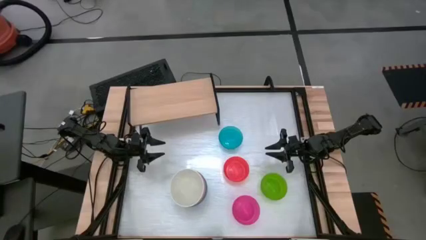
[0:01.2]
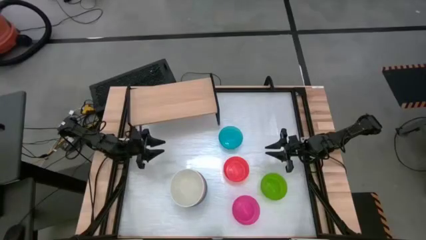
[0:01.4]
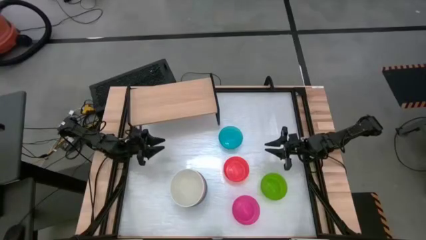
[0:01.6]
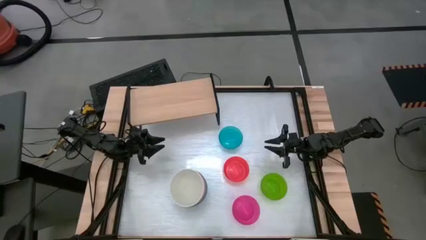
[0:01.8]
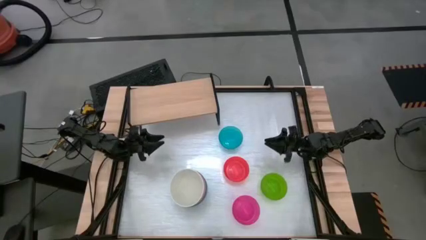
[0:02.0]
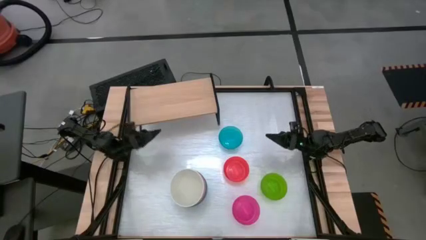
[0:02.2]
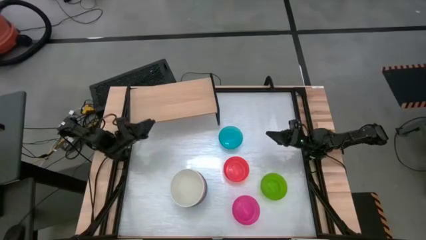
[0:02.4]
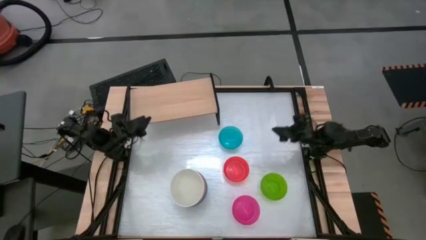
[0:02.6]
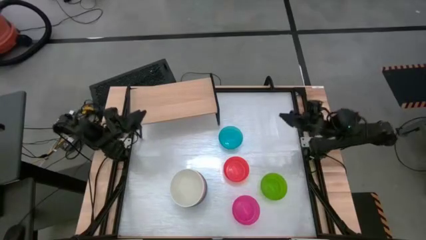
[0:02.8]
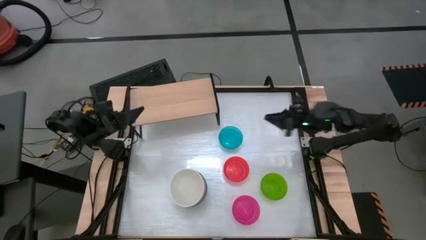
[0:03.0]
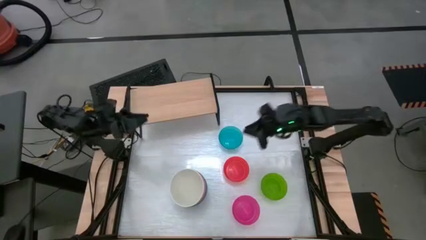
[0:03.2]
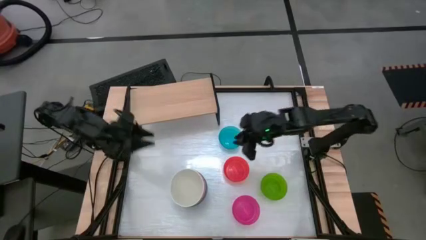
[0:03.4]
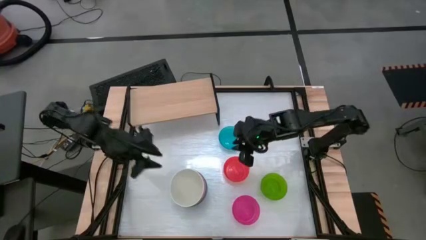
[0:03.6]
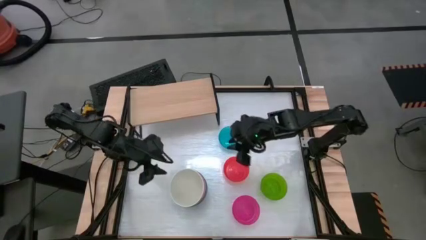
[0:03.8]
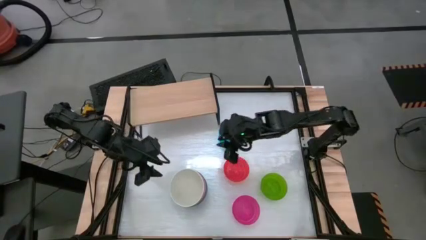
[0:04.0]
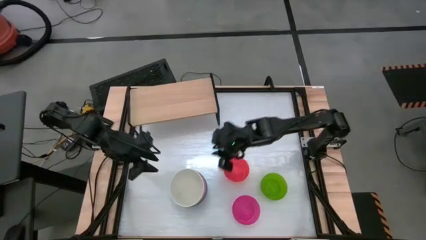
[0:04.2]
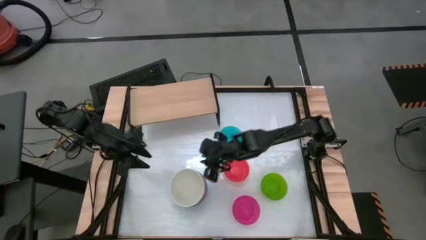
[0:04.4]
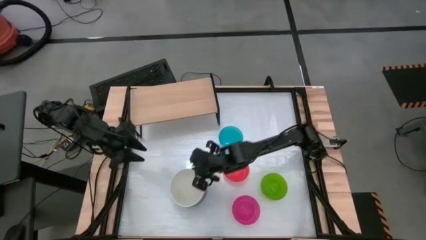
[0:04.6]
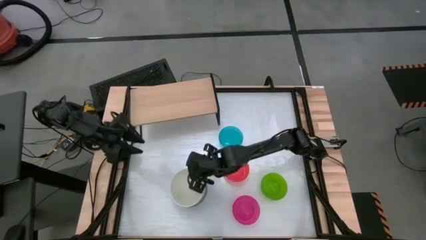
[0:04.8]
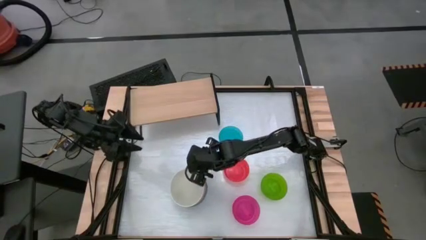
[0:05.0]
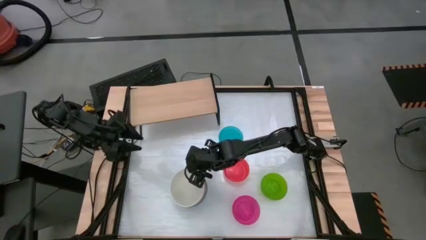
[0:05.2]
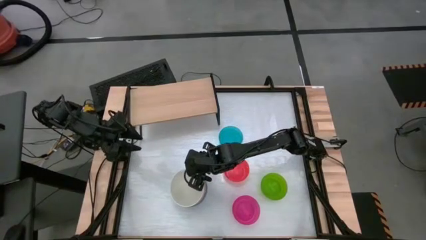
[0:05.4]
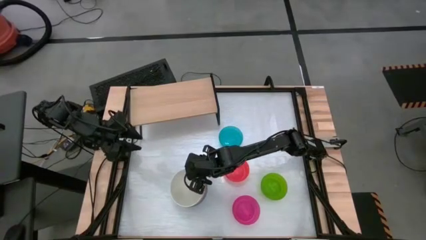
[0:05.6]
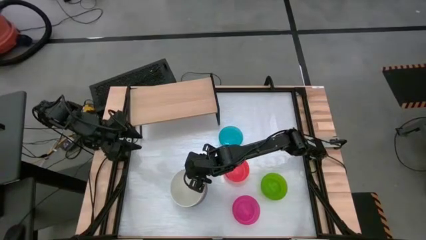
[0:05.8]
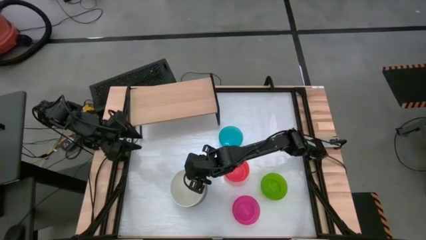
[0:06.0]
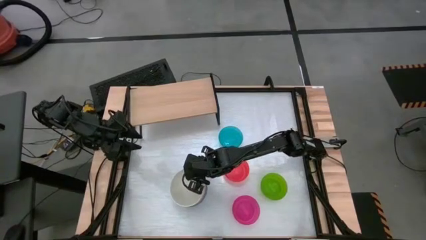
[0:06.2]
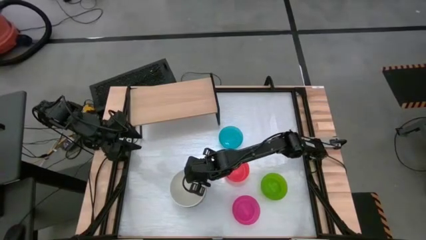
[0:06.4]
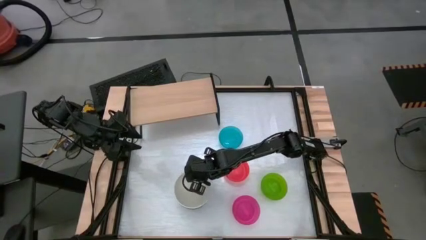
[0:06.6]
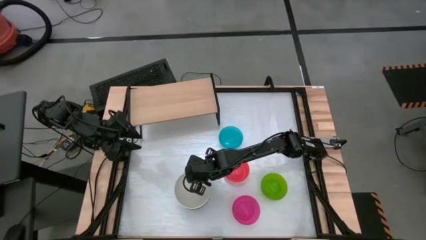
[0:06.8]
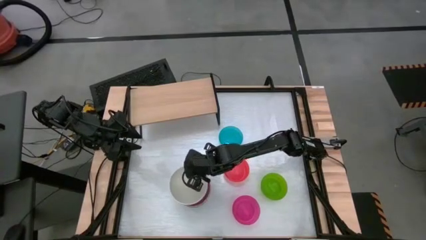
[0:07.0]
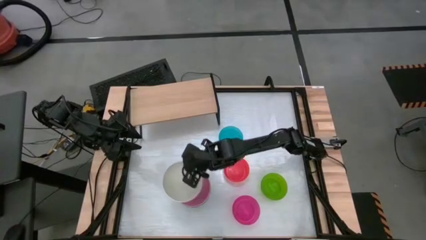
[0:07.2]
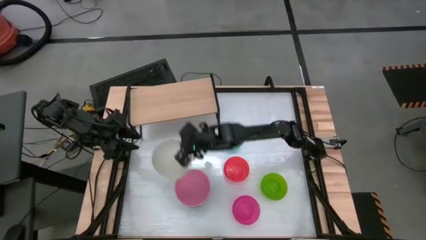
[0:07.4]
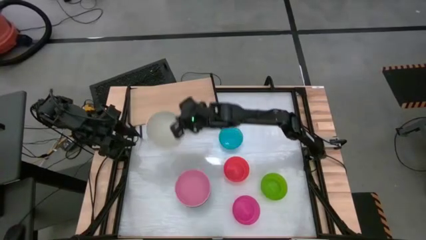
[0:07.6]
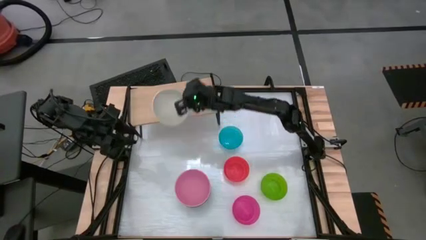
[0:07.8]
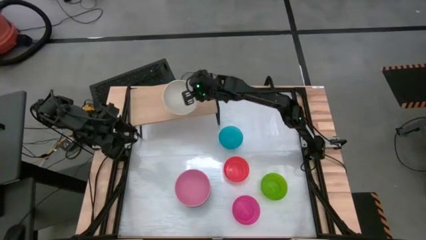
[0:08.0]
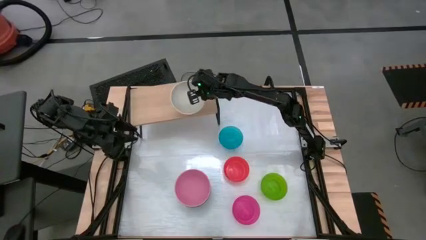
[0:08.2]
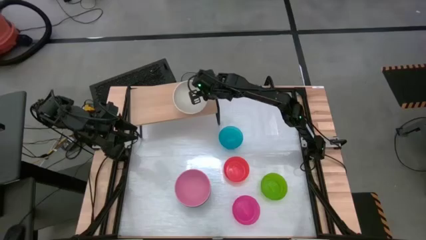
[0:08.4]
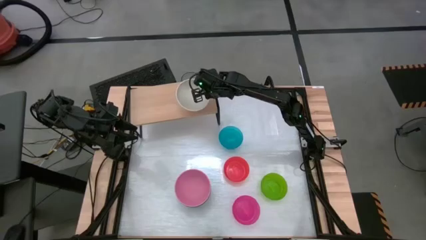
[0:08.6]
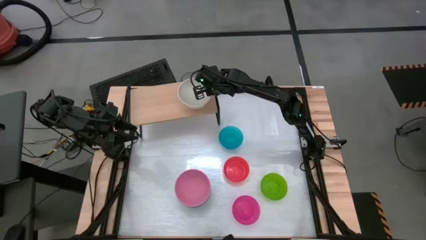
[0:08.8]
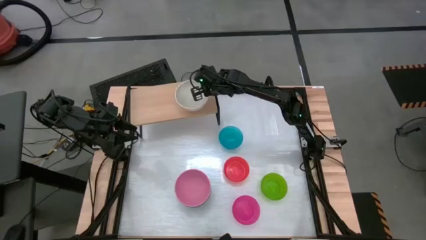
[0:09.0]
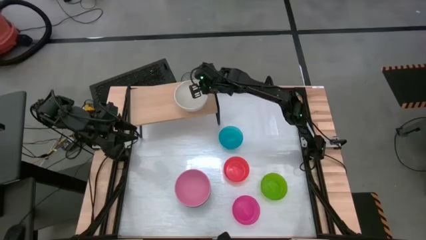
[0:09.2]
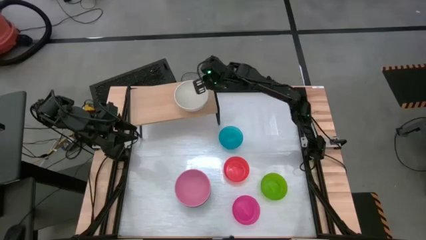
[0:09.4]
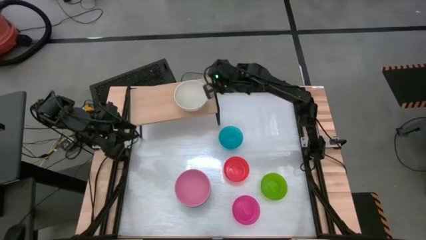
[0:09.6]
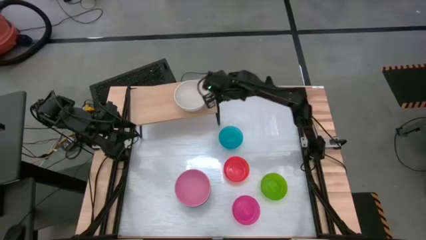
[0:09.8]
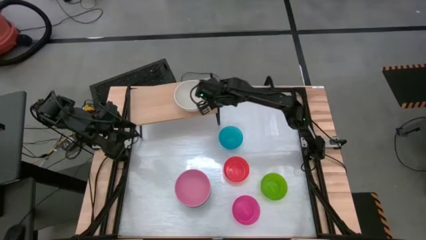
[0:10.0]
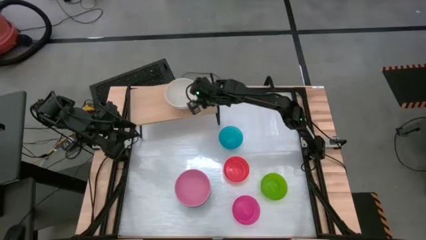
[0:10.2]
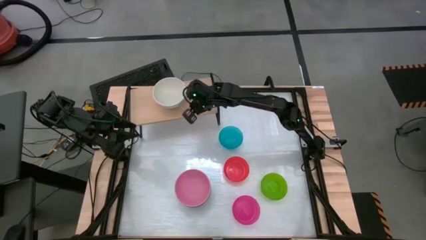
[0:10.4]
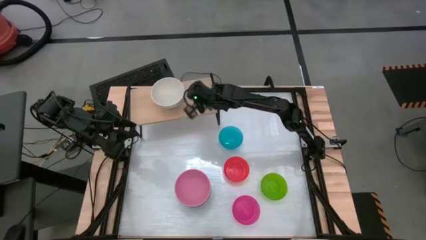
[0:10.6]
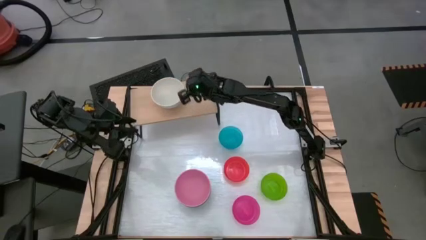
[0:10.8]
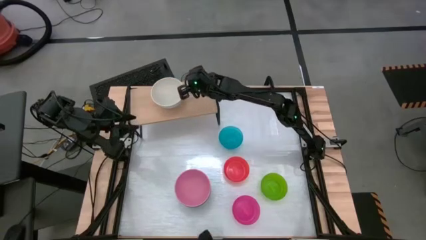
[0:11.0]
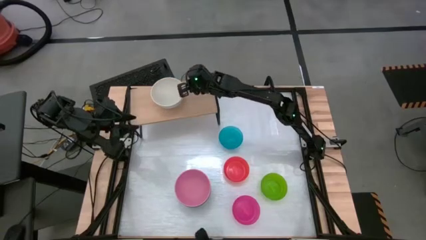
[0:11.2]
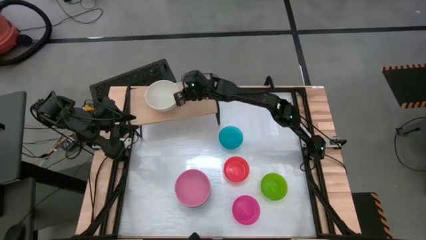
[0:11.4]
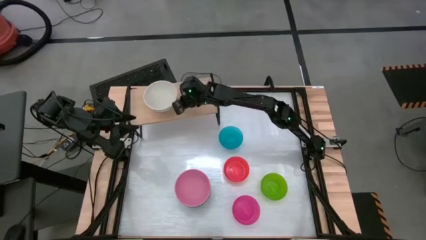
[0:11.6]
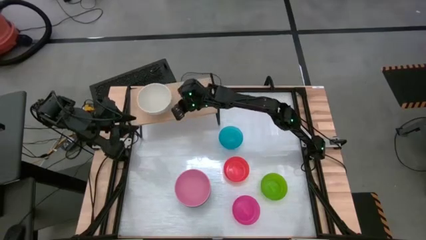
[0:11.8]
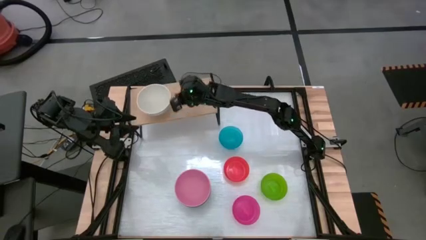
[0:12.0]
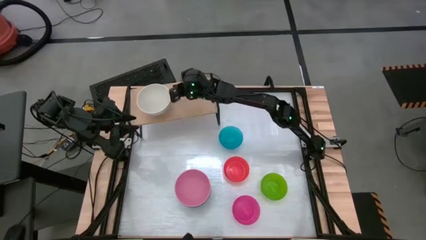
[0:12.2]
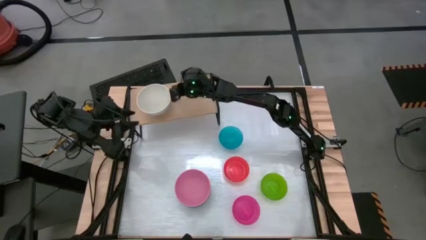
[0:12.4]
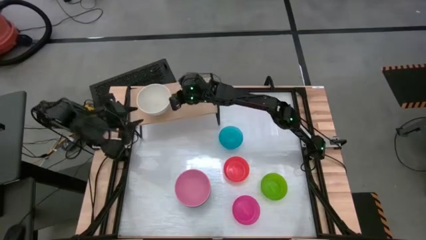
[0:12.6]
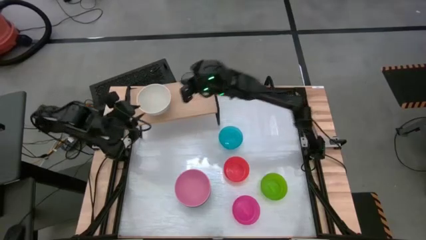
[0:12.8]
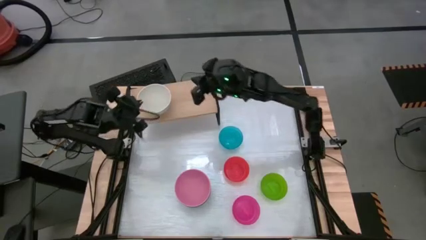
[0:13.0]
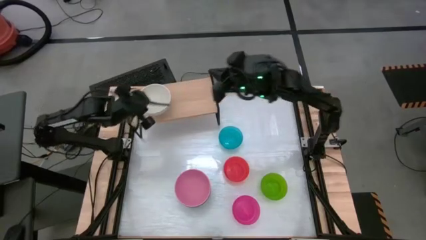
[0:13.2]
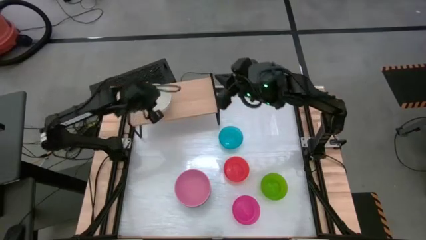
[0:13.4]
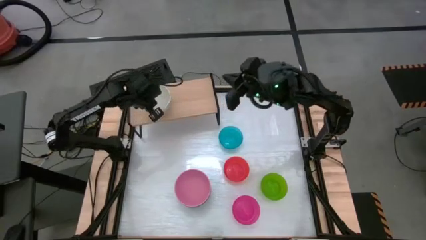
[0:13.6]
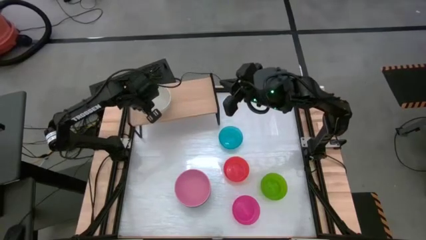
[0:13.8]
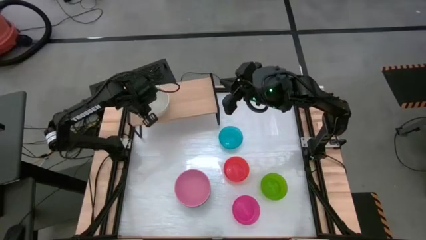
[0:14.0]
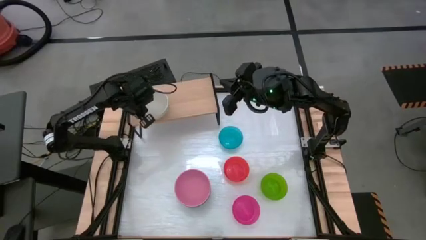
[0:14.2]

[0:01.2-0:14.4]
Task: Place and stack bowls onto a shelf
Put the big white bowl on the shelf
